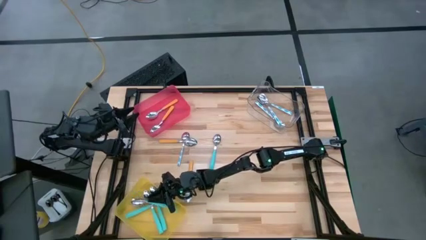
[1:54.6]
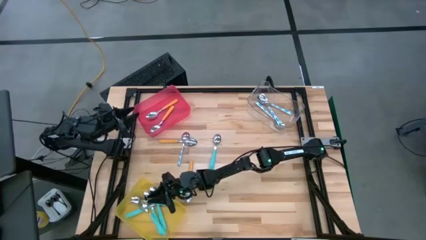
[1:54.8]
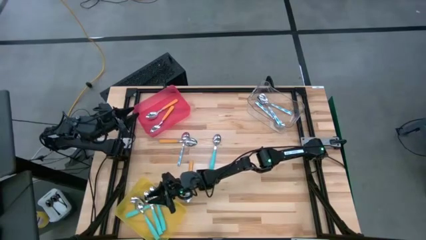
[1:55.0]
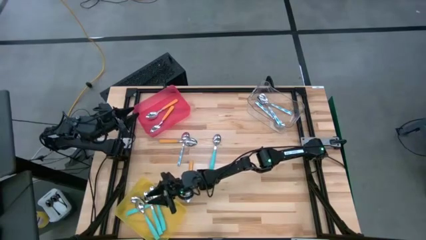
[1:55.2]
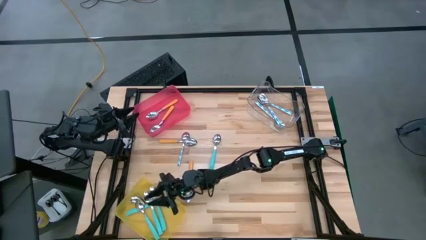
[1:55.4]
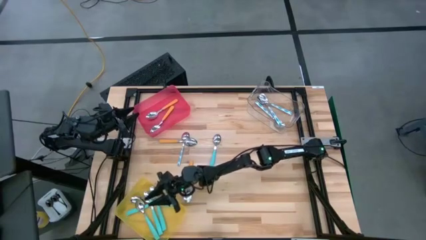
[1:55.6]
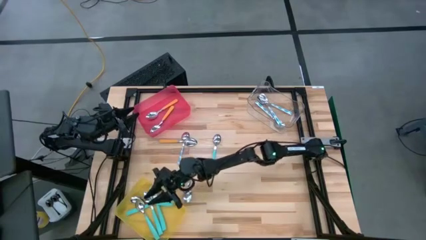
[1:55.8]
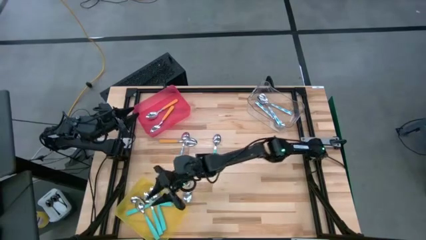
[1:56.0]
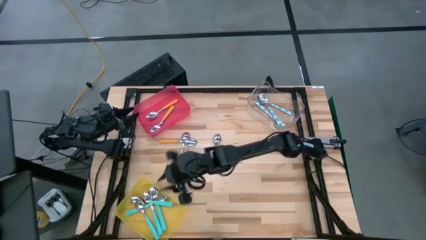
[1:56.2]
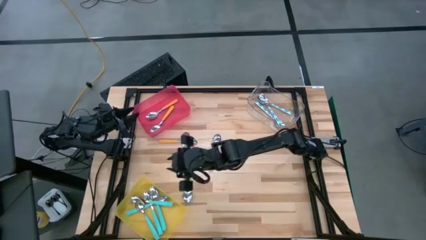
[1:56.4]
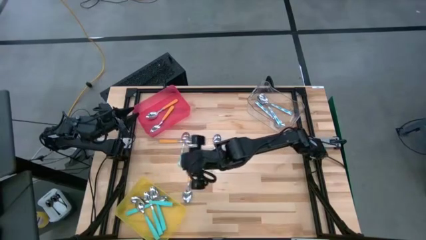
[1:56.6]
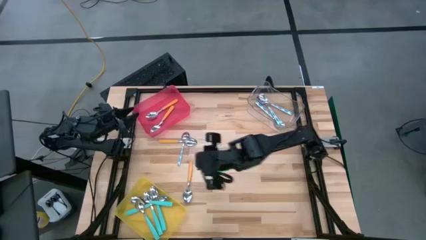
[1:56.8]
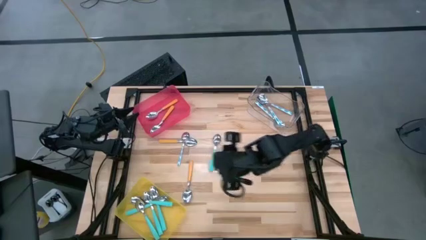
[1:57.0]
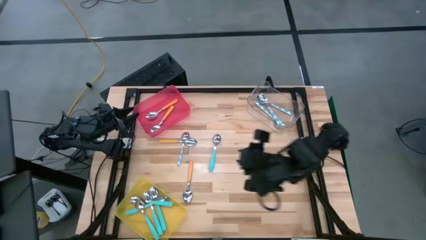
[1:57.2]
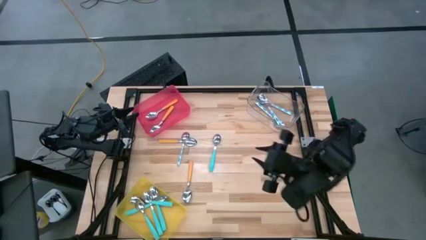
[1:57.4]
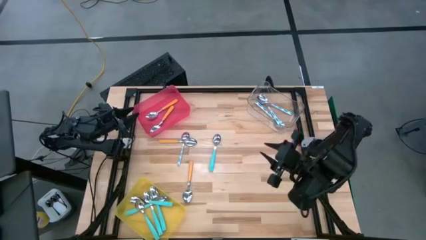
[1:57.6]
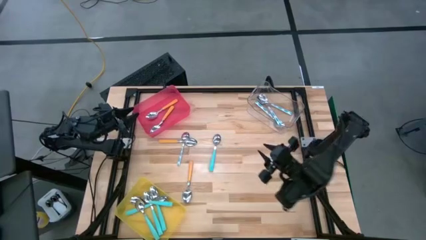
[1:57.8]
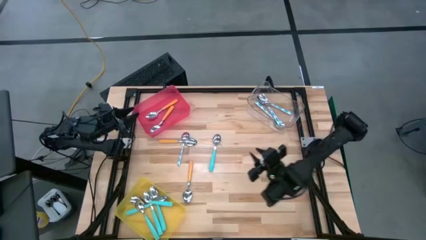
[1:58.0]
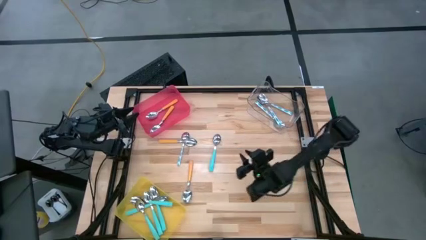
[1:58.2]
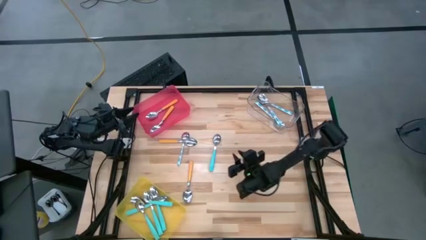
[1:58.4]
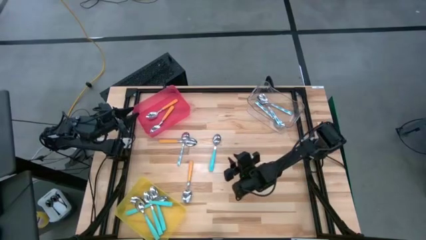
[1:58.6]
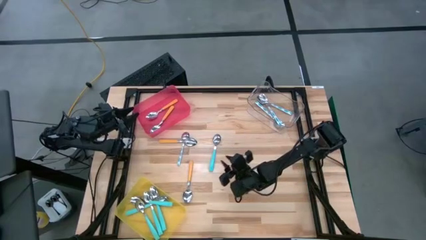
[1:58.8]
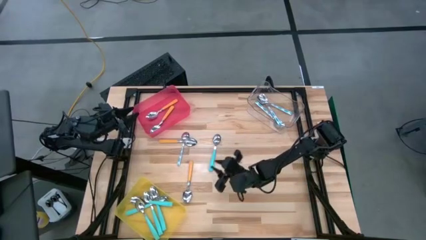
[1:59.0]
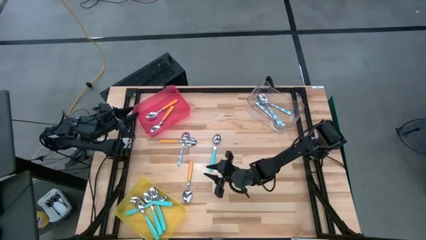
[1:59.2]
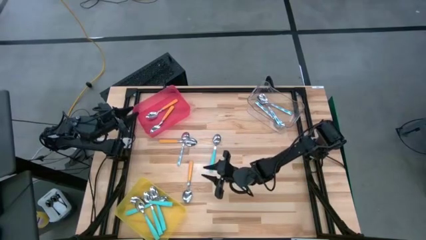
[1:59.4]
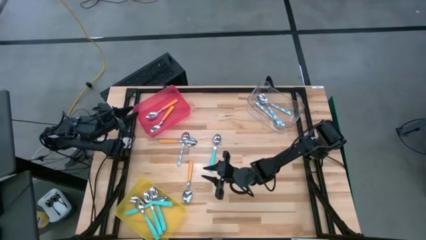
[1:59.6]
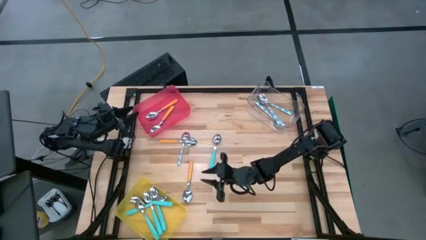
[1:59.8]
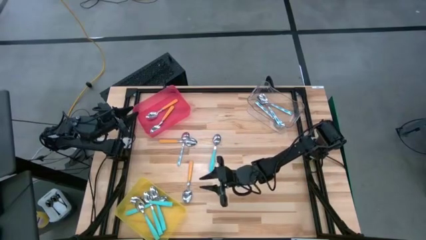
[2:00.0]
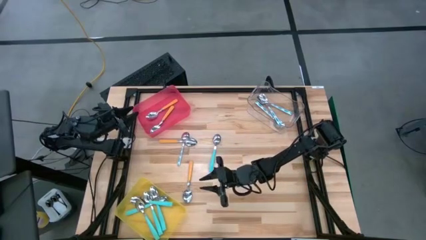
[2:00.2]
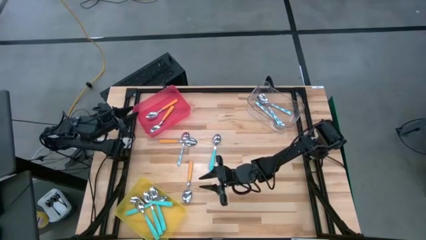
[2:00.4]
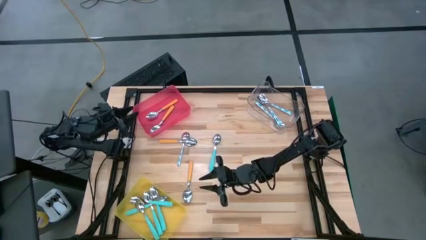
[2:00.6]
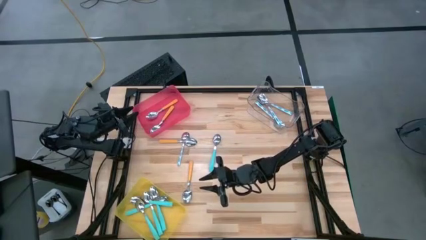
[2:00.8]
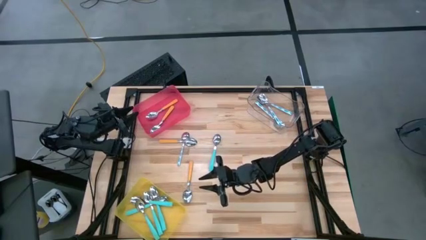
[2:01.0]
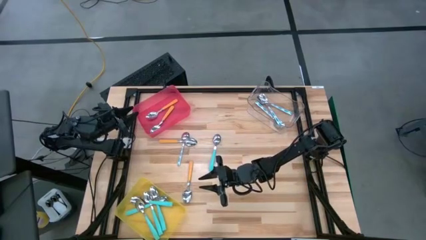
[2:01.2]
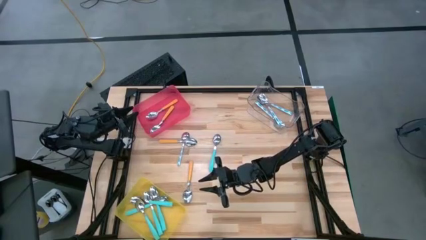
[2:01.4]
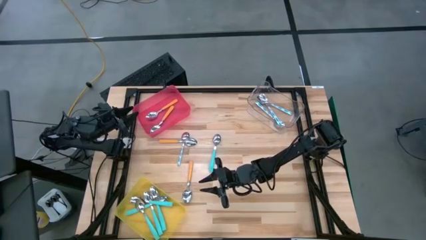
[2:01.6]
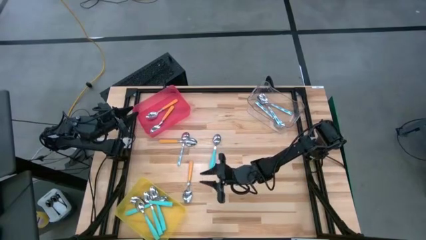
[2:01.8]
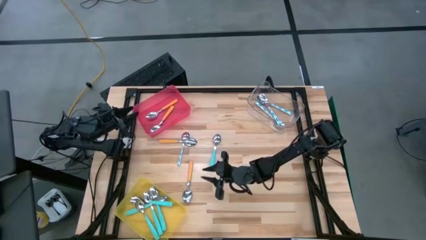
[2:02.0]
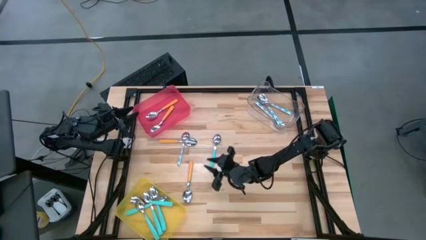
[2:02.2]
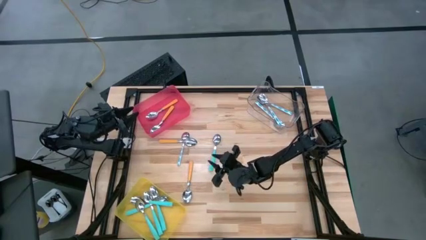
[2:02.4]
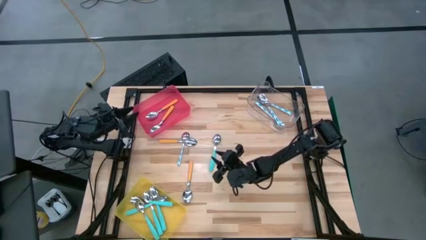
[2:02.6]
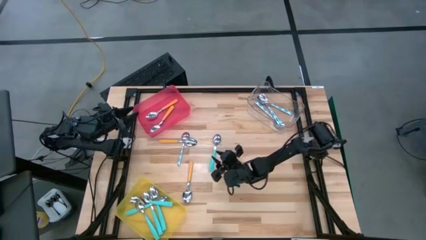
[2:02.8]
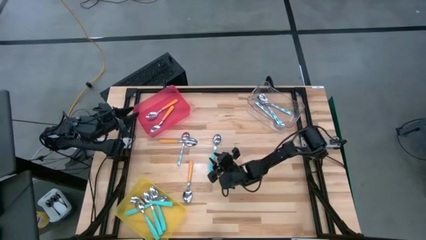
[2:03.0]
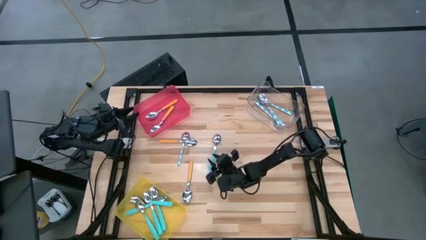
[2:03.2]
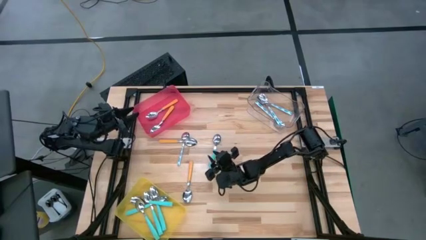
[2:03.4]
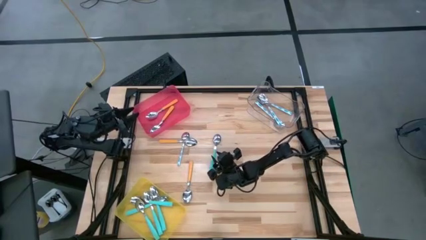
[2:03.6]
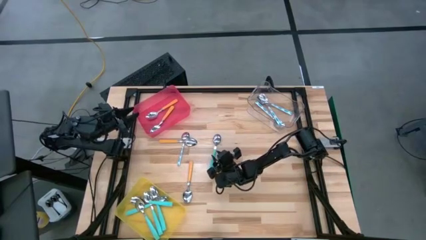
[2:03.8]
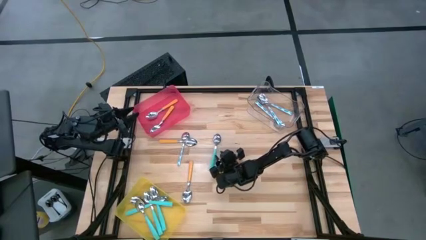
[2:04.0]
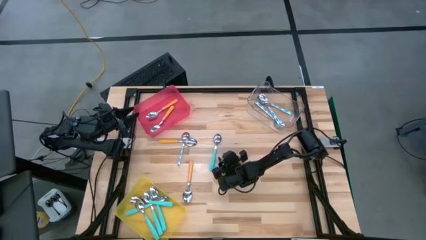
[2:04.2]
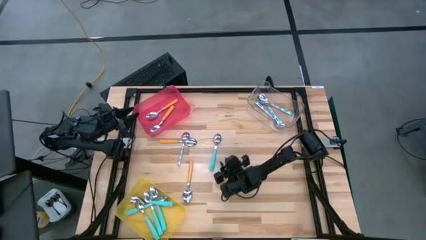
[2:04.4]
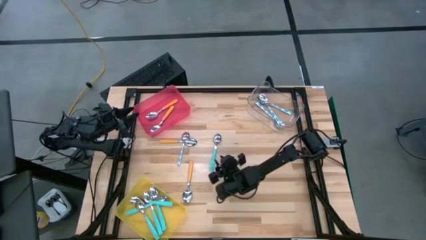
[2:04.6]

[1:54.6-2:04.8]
Task: Sort silverware by color (type)
Put the light blue spoon into the yellow bin

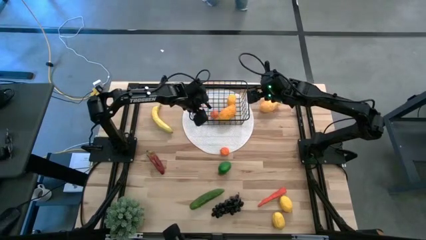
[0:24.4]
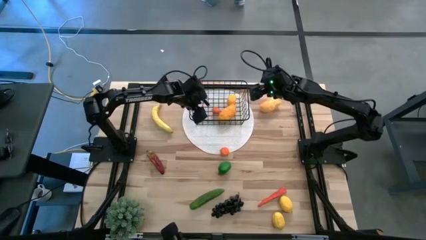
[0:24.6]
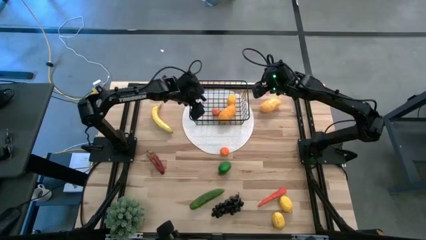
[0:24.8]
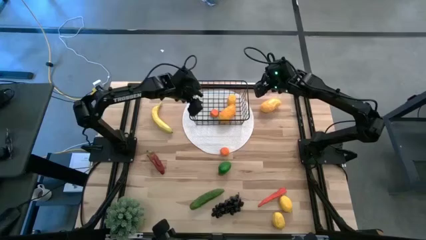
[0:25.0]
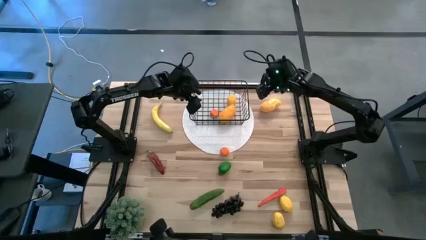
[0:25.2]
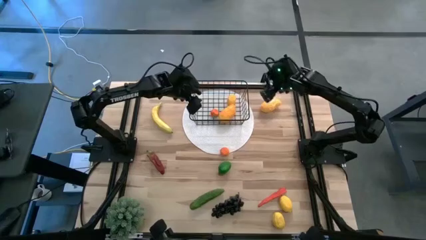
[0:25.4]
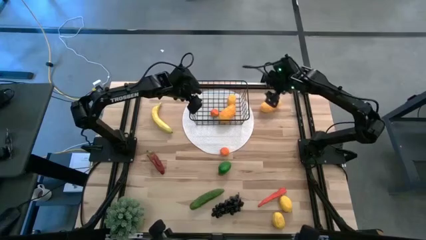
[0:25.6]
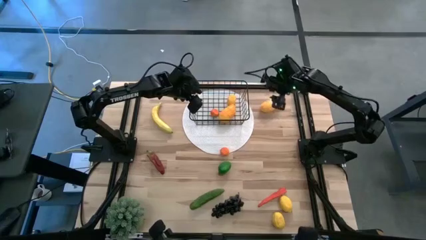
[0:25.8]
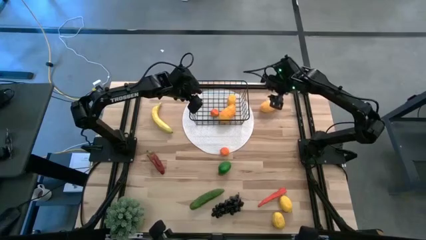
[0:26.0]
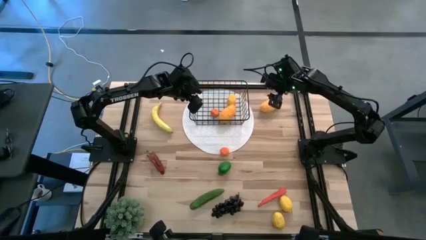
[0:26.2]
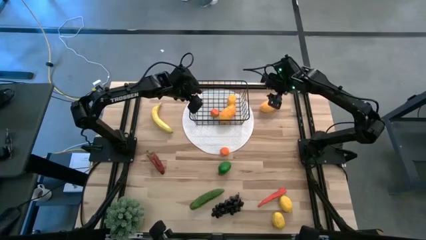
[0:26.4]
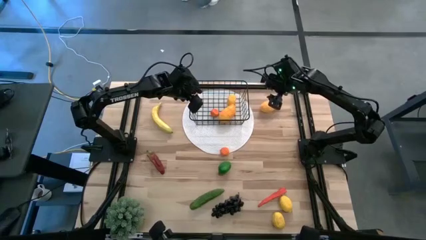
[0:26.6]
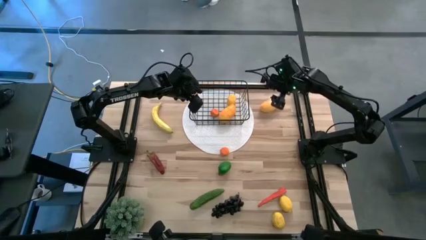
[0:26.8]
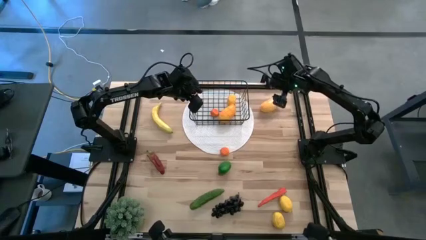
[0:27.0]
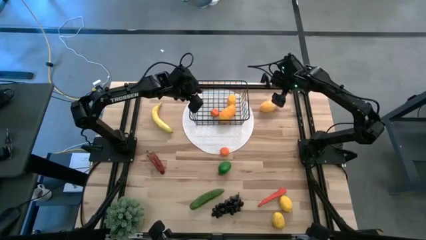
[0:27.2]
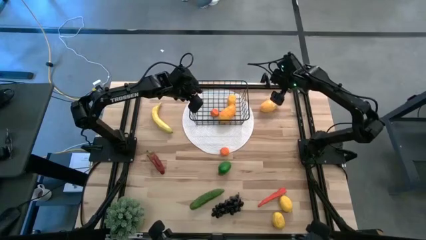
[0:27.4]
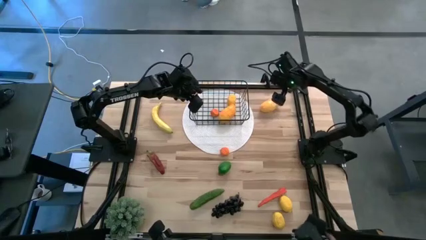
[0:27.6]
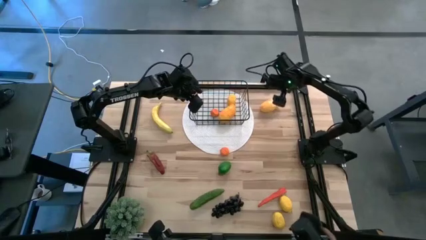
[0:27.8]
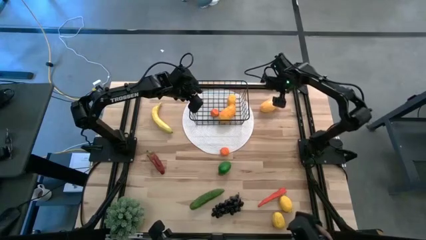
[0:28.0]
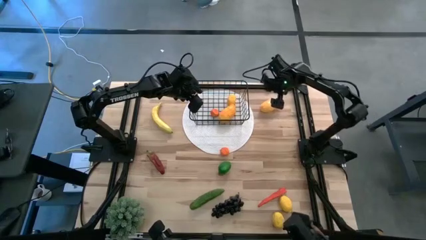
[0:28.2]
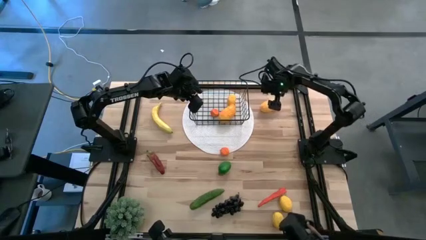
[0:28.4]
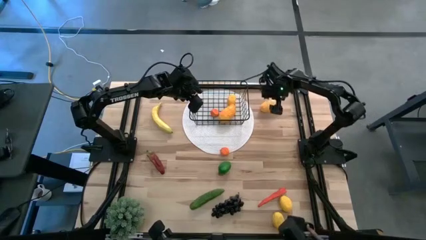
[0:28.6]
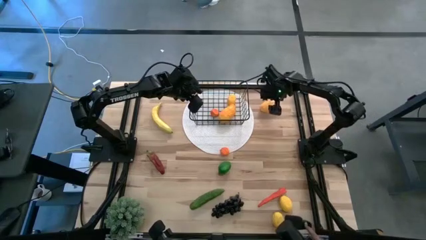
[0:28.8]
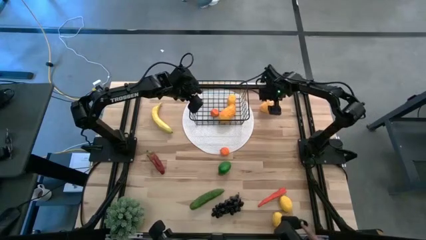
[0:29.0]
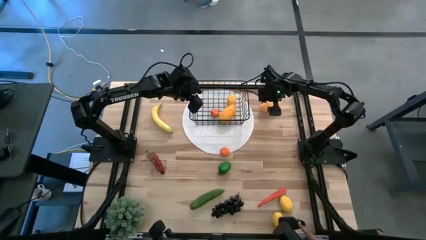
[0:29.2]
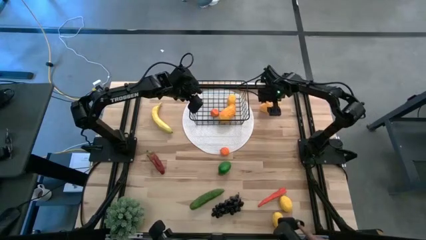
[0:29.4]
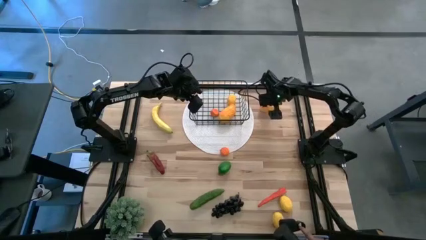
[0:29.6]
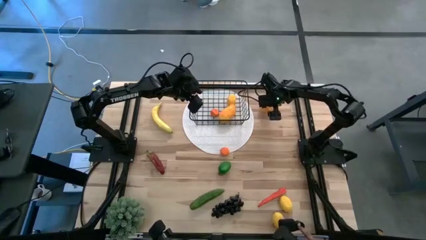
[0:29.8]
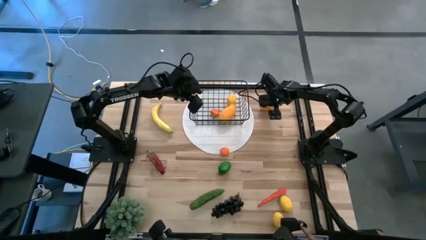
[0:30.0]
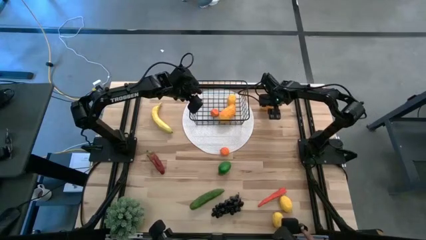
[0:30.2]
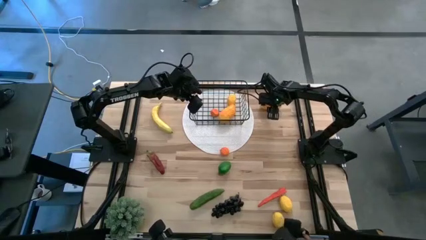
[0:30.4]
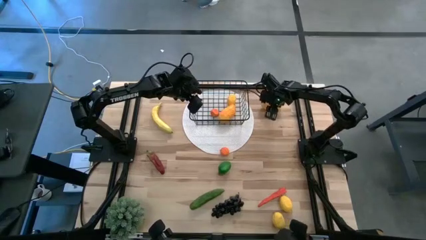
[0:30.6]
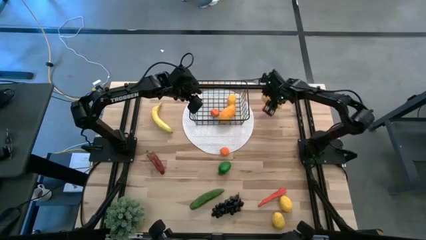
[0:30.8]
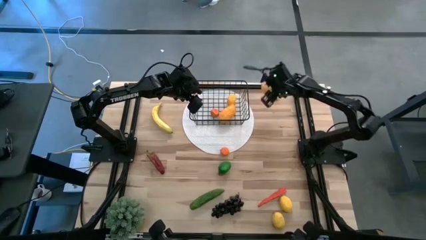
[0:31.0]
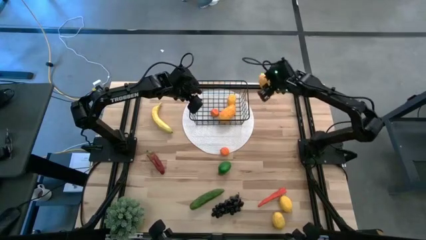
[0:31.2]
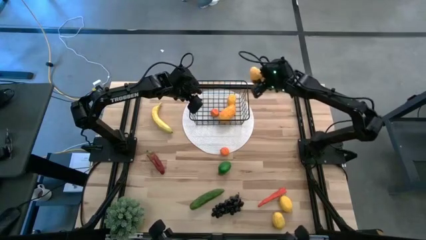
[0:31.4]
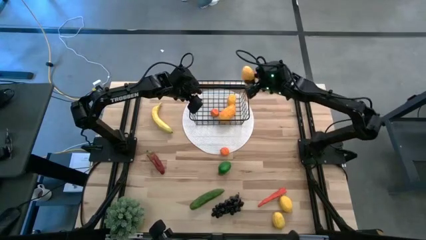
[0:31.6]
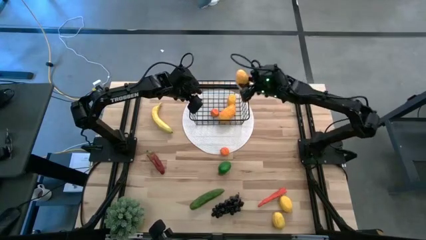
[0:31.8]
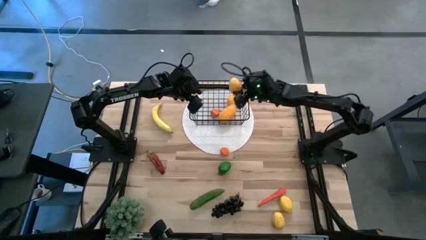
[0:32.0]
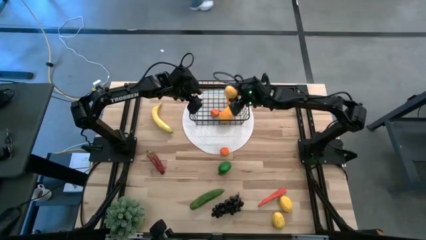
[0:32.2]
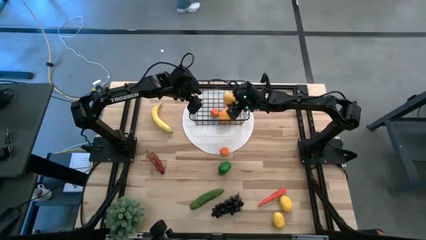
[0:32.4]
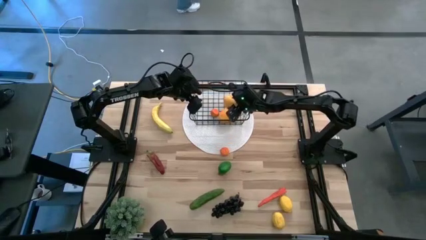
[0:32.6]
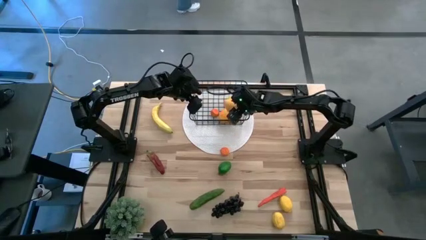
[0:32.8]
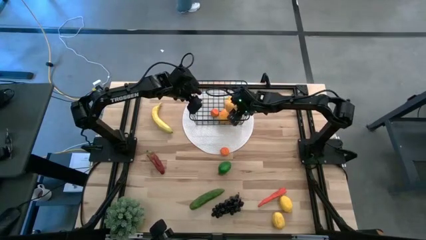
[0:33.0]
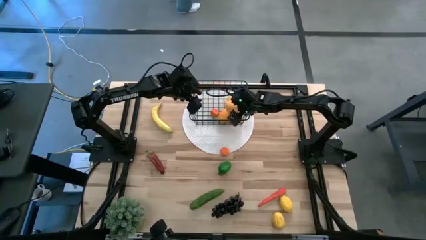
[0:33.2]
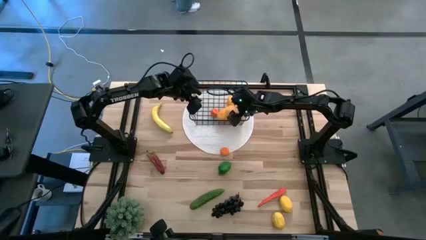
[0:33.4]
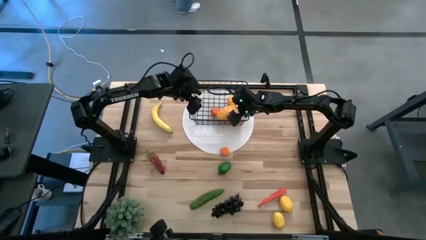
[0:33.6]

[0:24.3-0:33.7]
Task: Build produce basket
Put the mango into the wire basket
